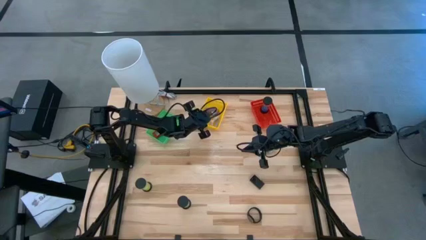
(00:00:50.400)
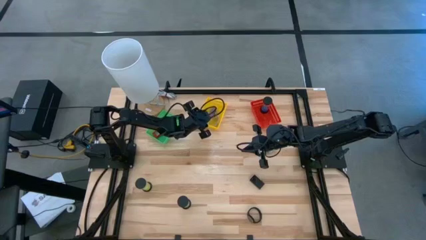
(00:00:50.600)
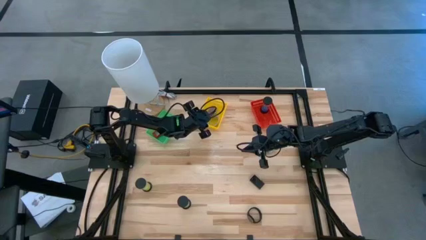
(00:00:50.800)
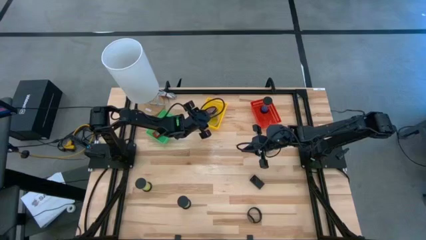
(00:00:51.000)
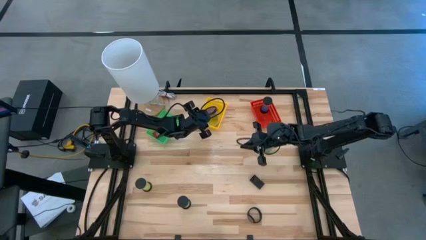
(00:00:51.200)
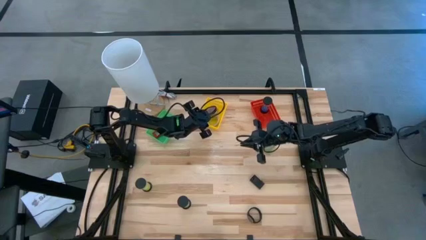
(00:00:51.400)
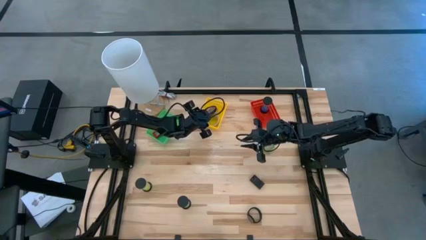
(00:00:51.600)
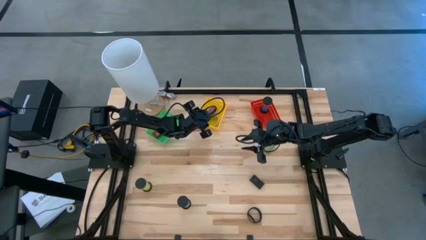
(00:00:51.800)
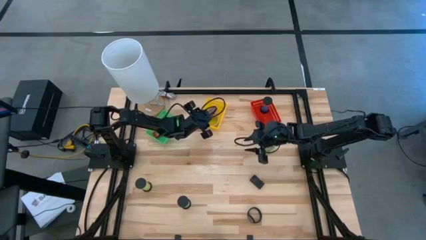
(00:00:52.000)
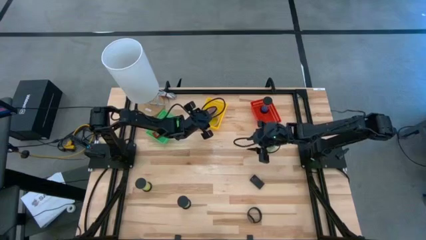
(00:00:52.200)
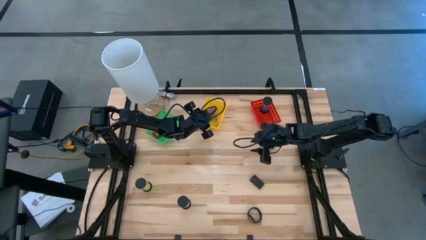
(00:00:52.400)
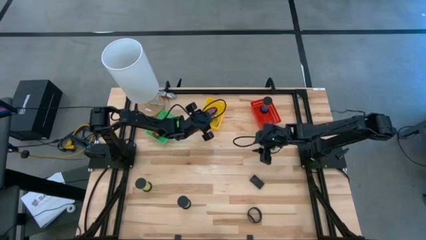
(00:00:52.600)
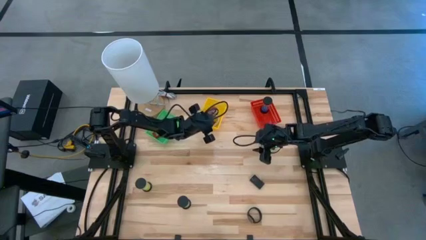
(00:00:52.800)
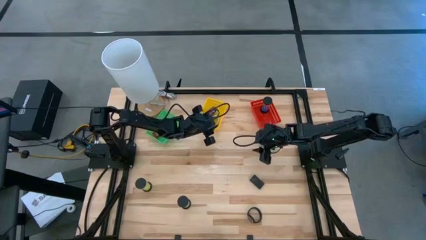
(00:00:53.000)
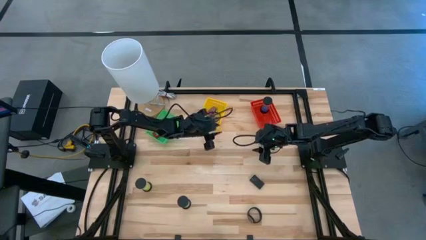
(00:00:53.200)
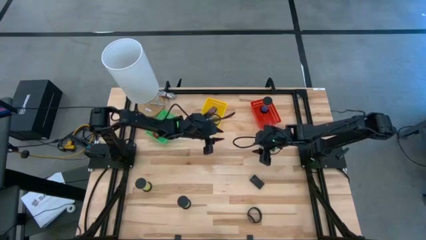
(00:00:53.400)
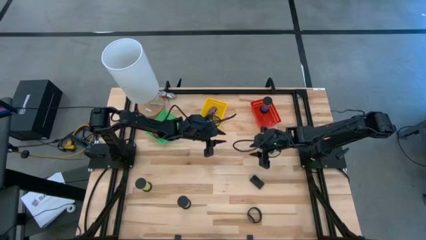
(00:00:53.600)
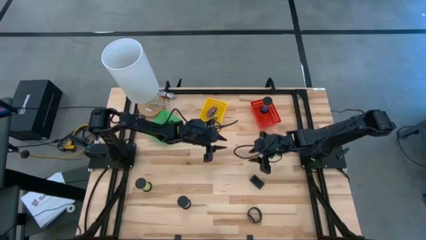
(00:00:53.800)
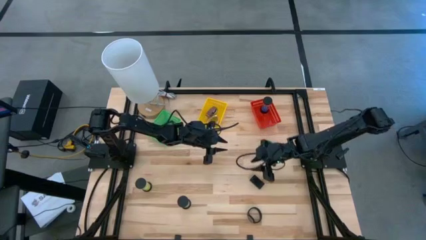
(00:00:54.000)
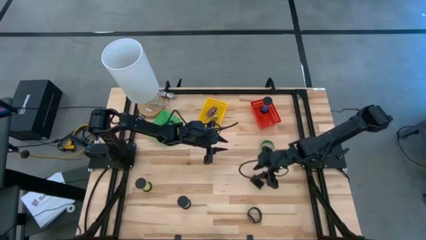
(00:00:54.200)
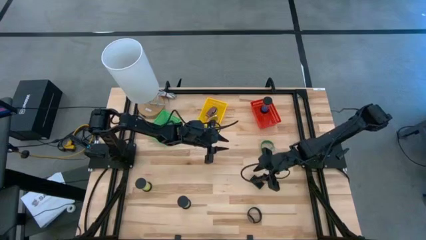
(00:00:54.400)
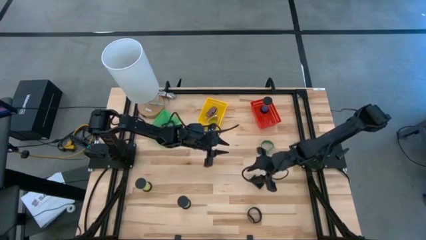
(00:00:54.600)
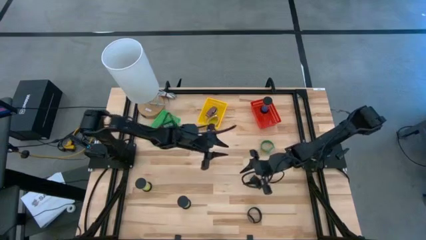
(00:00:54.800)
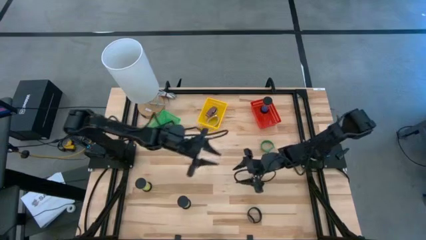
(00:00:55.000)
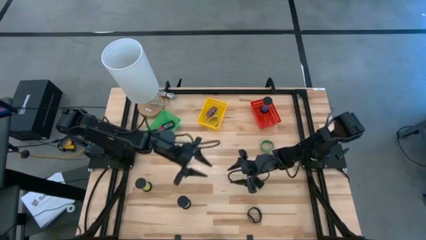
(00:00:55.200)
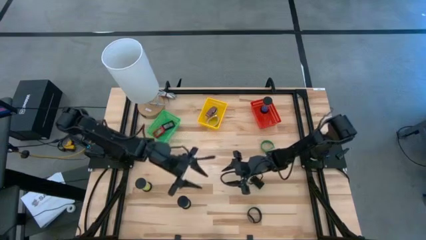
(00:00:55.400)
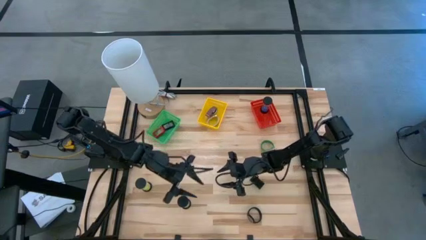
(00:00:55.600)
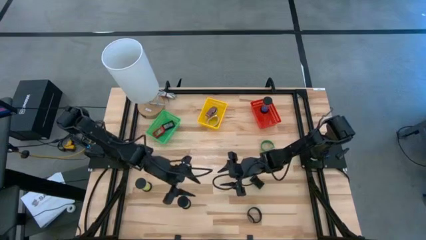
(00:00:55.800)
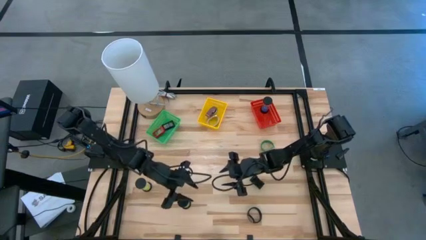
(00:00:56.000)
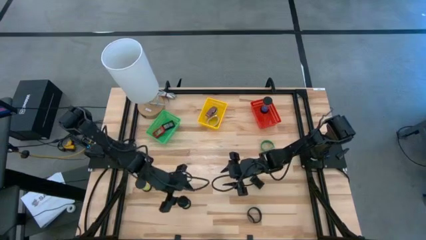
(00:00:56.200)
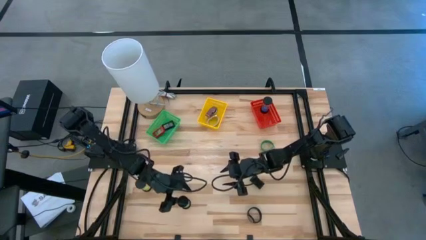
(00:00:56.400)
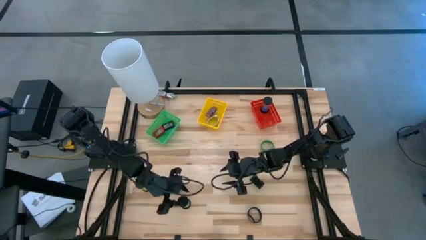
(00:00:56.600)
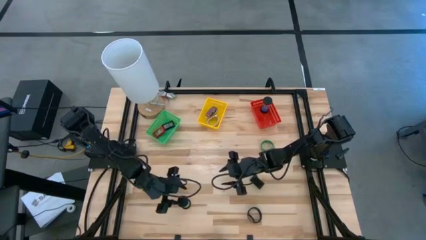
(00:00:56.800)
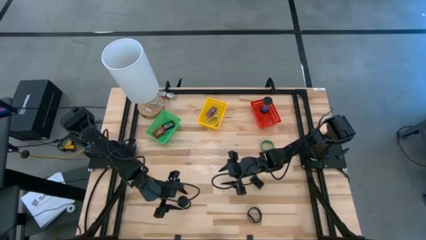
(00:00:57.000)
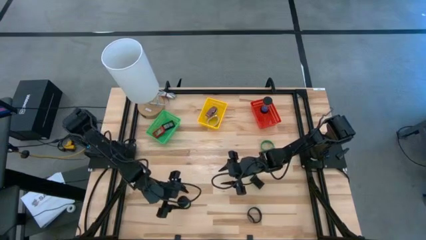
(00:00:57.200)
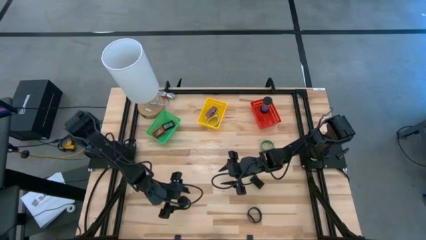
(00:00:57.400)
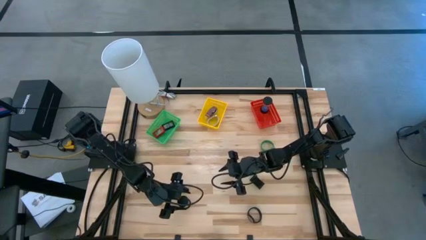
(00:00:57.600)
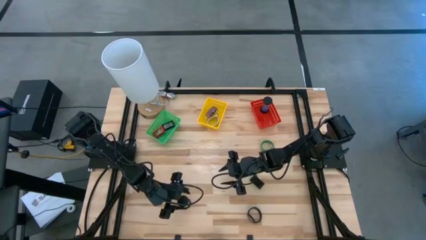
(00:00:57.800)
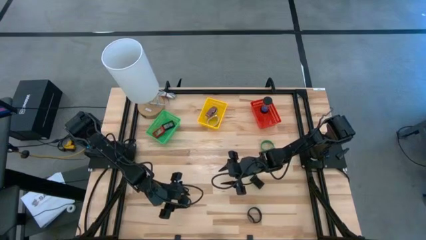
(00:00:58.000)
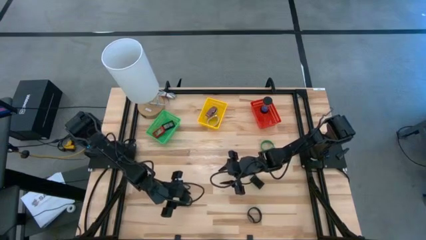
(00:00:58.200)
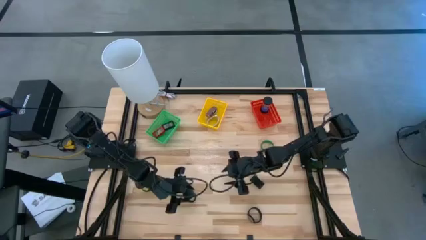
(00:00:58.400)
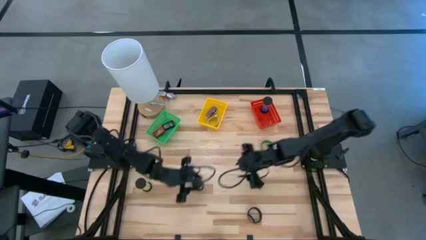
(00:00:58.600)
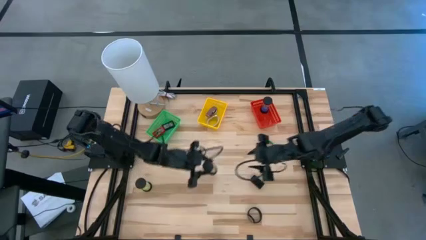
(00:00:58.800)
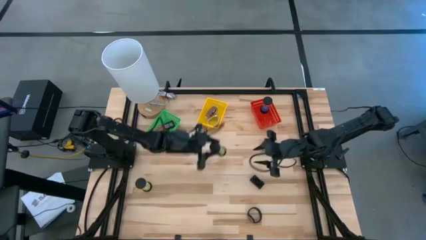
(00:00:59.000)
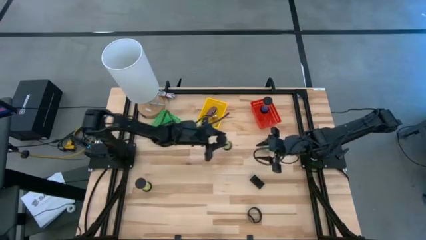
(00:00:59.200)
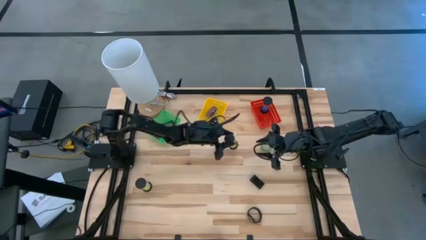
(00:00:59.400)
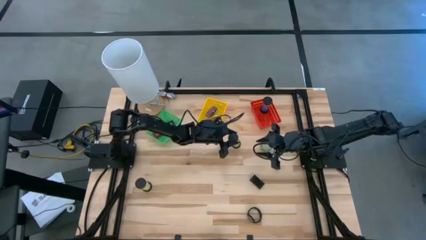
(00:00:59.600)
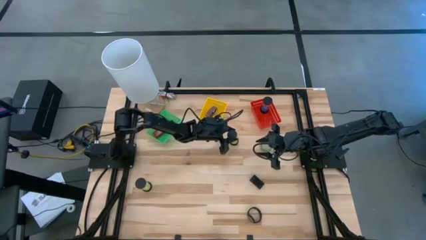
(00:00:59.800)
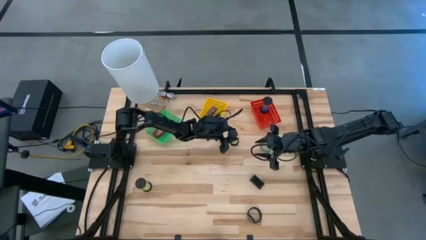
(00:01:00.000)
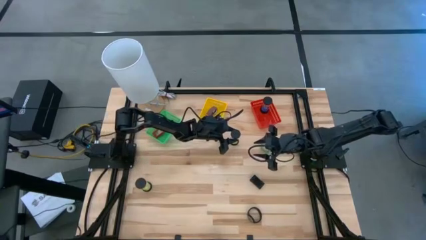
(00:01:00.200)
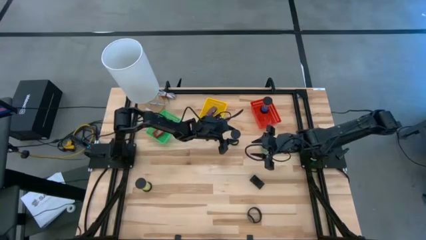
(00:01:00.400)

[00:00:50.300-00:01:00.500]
Task: Pick & Place Office items
Put the right yellow hourglass into the red bin
